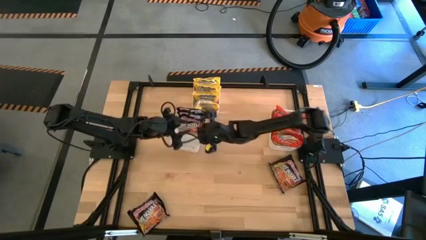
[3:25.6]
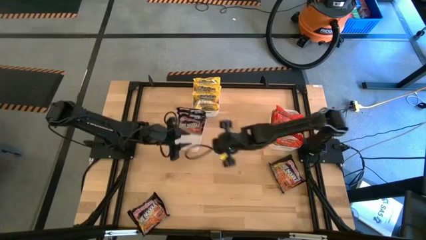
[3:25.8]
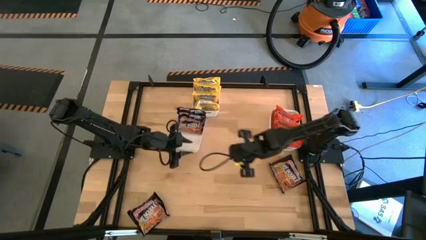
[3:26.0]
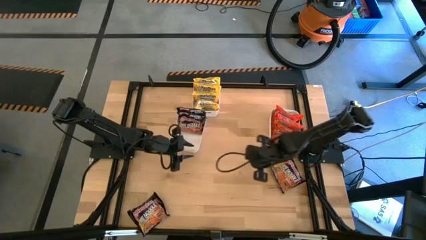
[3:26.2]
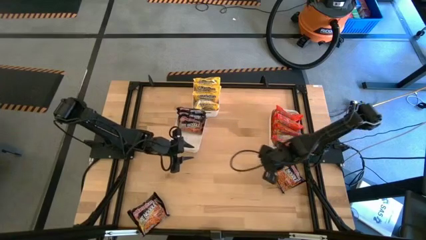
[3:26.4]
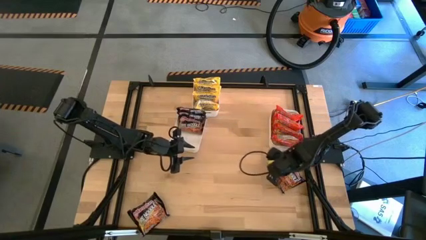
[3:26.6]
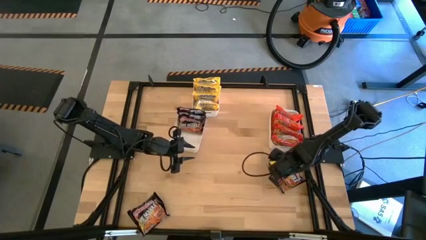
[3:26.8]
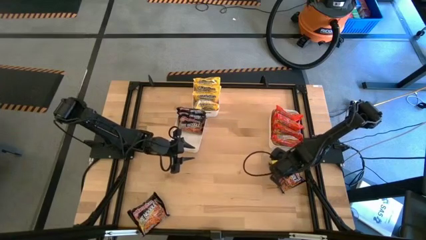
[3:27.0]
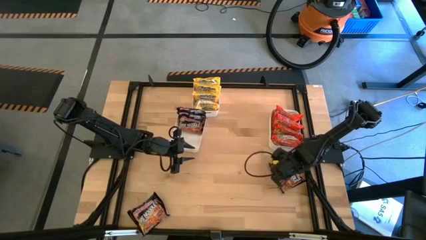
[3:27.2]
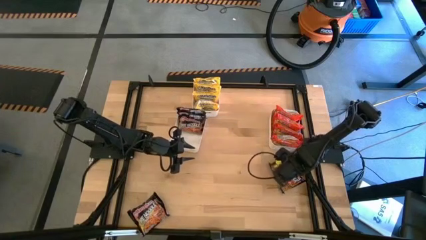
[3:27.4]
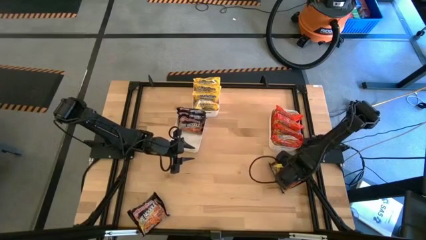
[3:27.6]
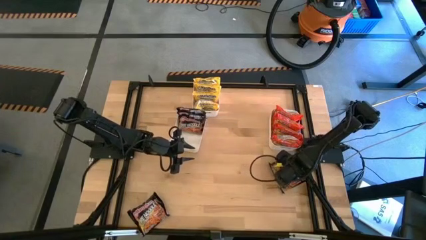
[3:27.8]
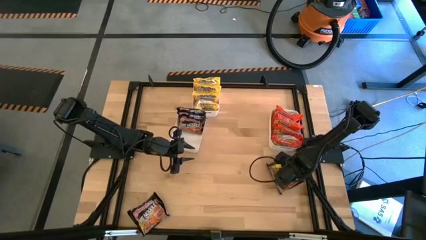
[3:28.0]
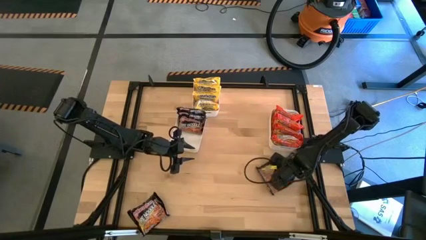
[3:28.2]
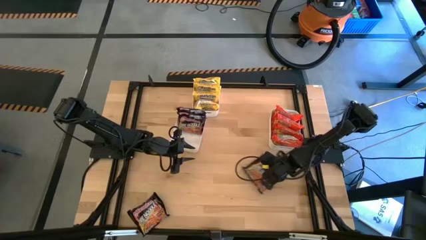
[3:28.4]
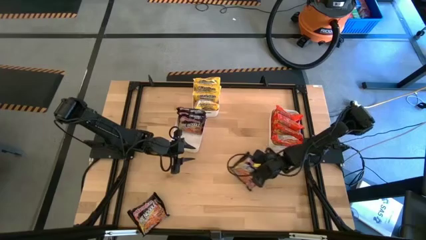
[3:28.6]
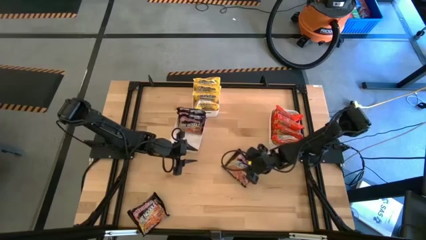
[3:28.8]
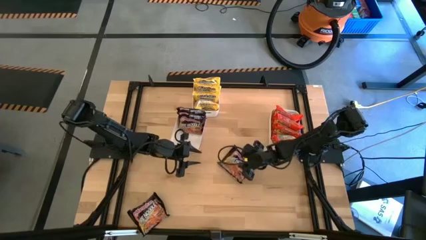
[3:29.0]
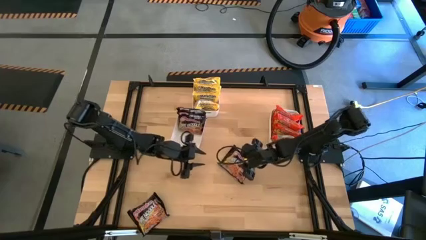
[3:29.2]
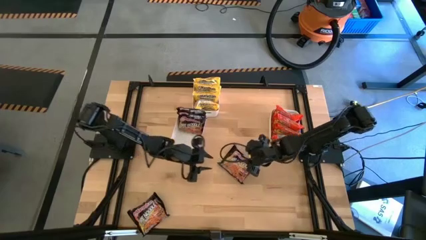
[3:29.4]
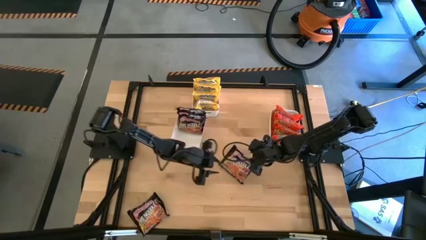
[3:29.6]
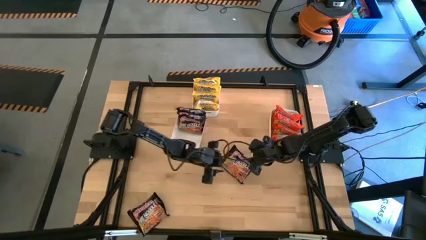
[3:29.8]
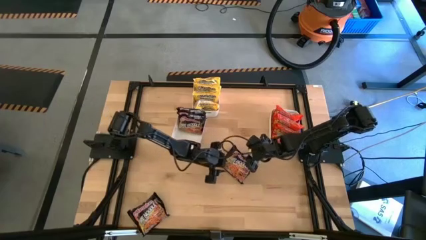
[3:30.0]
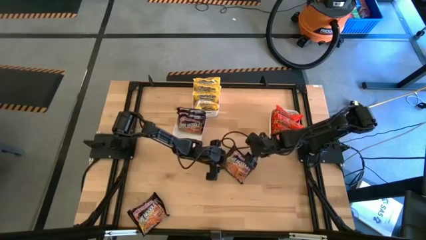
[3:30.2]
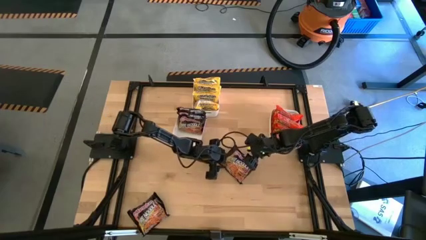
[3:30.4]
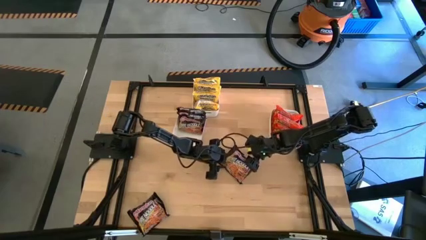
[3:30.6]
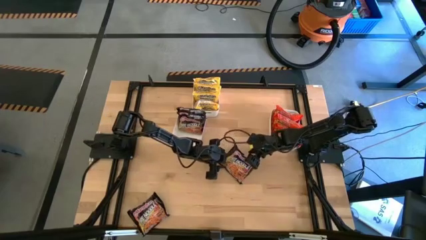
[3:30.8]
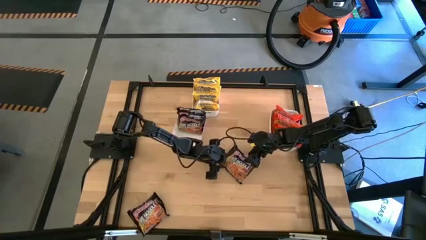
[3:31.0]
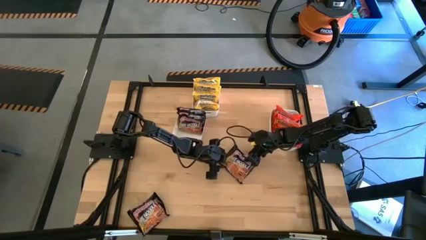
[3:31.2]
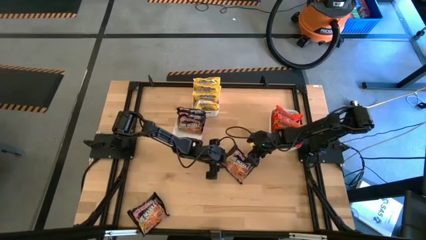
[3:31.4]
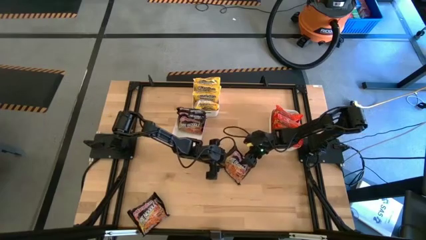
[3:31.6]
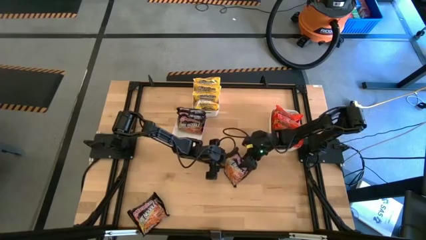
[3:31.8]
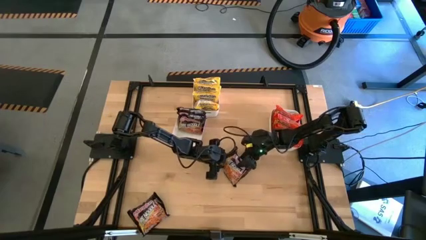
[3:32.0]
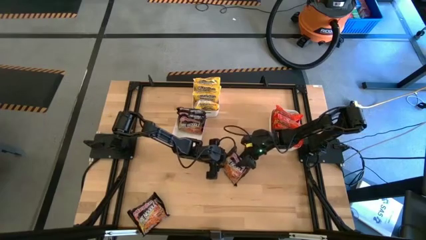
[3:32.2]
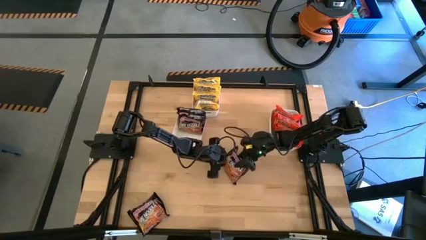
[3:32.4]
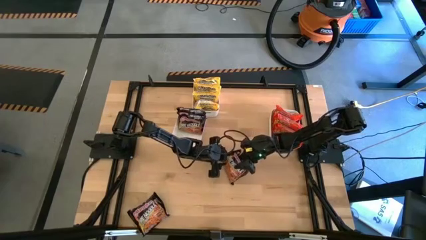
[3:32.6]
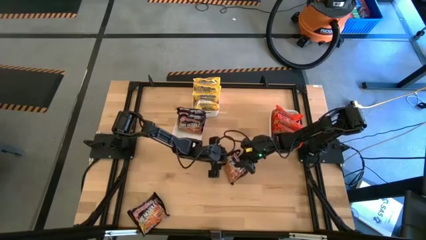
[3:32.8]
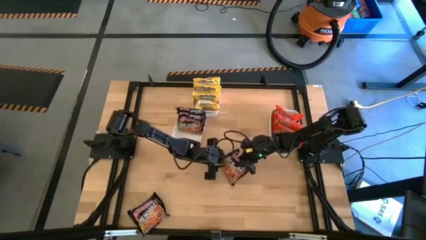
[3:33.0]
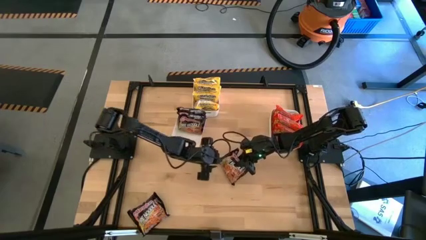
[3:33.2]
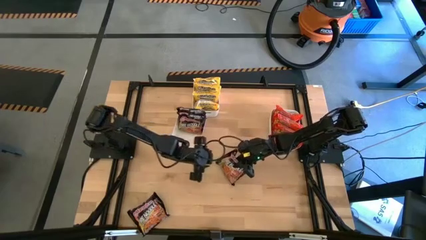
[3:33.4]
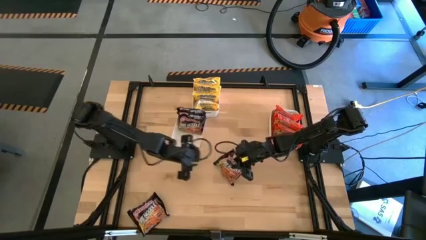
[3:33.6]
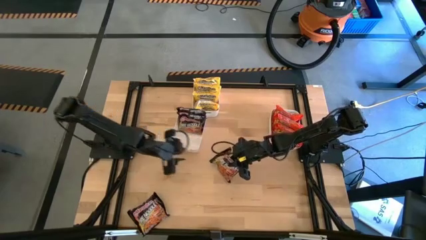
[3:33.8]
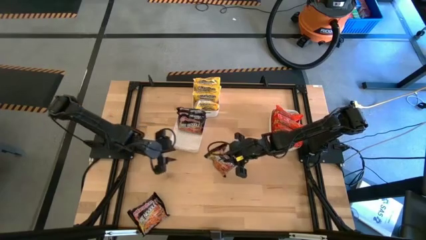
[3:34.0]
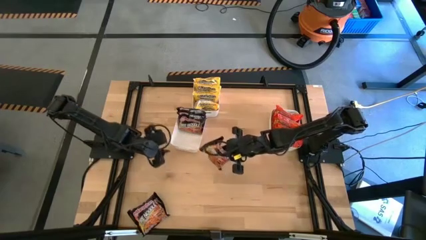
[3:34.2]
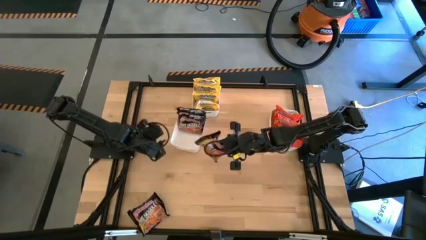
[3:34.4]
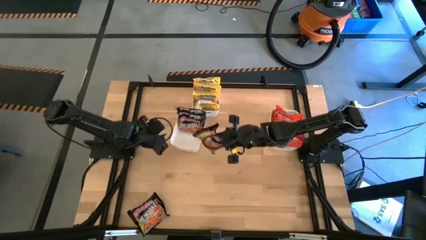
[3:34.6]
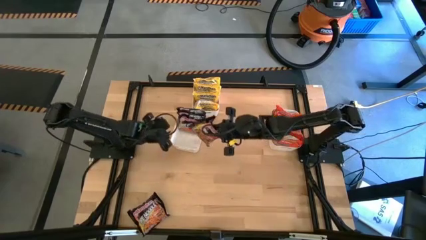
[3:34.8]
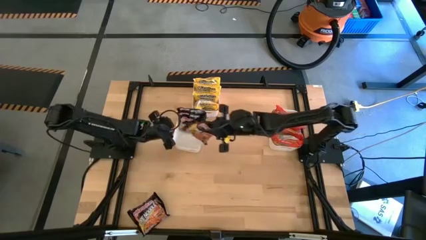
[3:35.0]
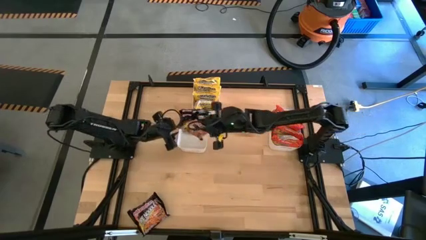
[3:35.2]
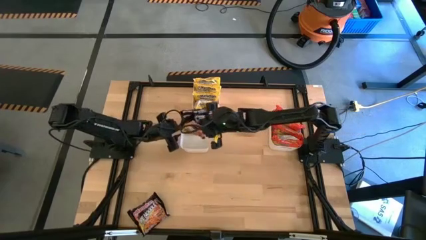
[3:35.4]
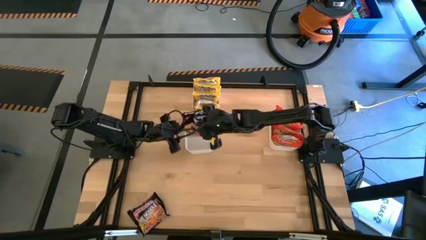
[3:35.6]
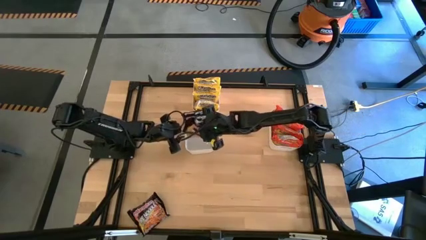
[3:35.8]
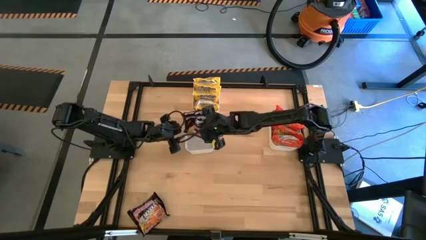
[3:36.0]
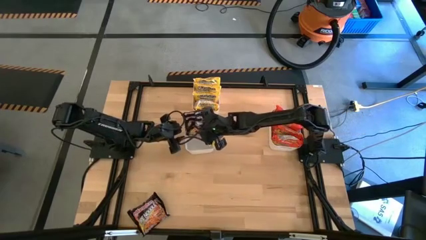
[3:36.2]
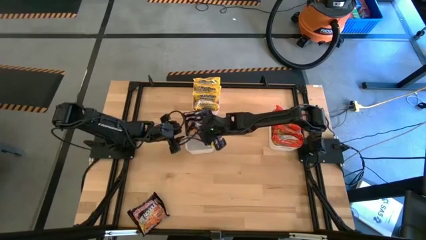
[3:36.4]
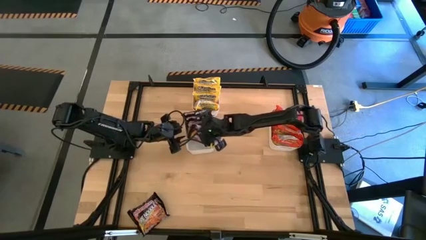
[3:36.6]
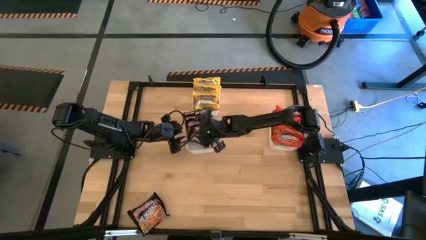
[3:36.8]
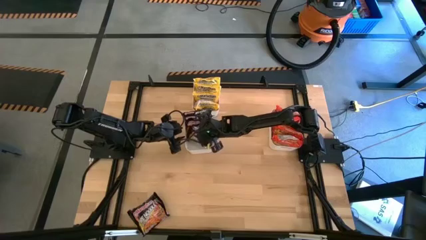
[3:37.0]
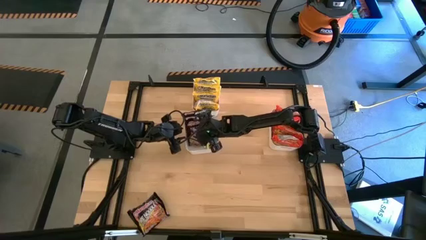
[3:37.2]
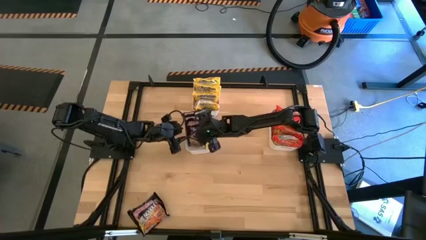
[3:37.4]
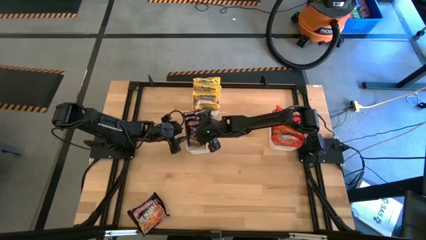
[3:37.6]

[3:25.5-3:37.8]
Task: Sort Maruchan noodles
Put the black noodle pack into the bottom left white bin
